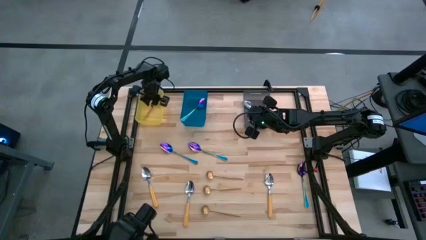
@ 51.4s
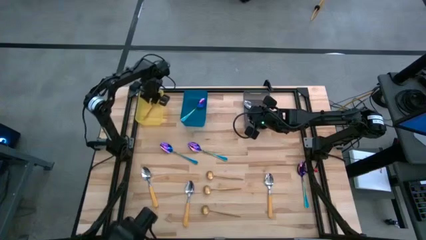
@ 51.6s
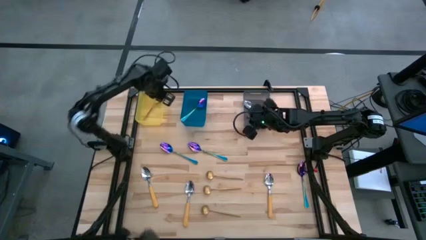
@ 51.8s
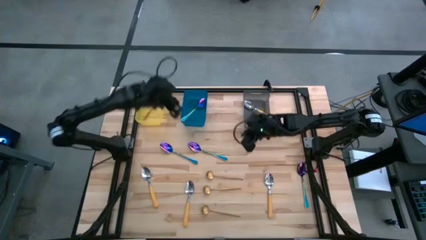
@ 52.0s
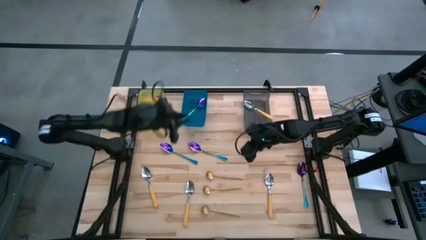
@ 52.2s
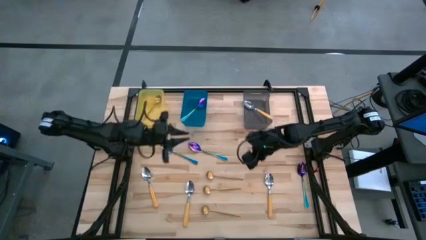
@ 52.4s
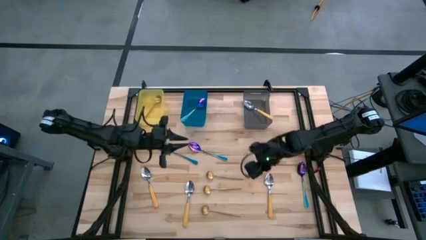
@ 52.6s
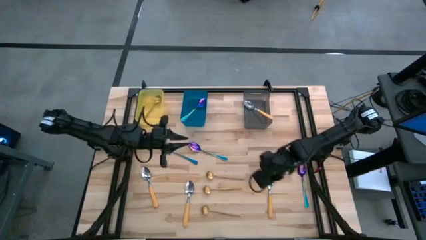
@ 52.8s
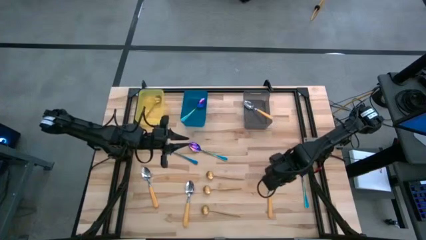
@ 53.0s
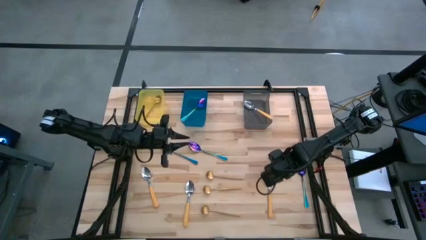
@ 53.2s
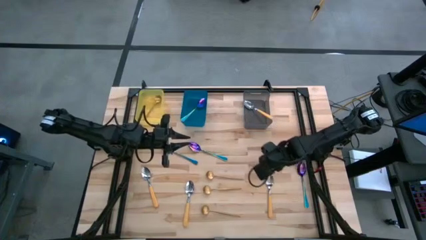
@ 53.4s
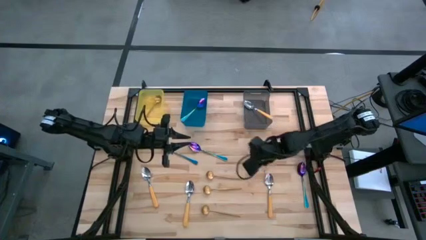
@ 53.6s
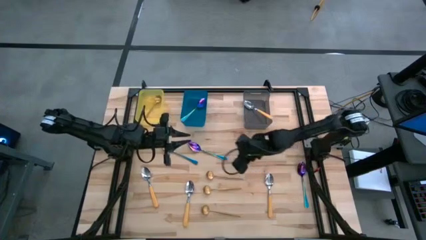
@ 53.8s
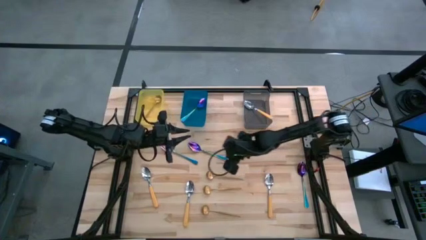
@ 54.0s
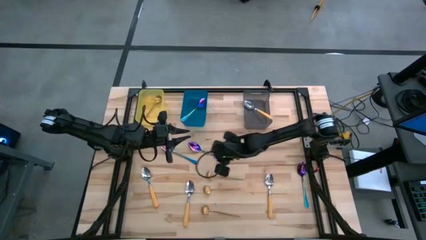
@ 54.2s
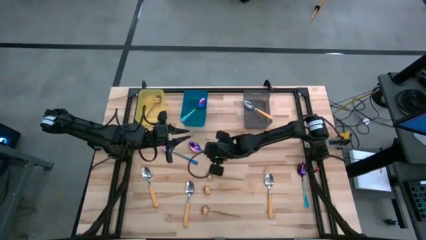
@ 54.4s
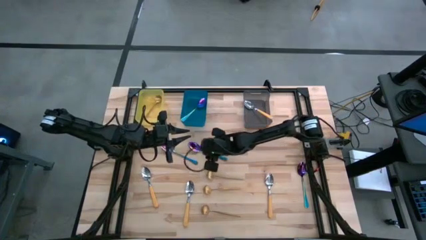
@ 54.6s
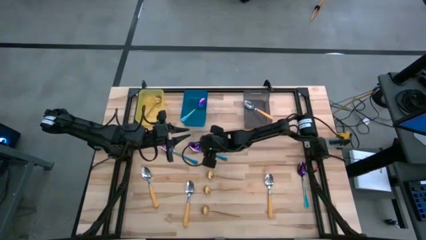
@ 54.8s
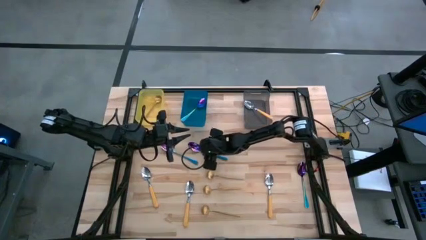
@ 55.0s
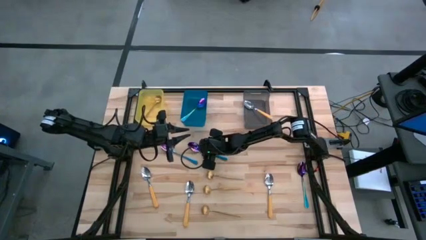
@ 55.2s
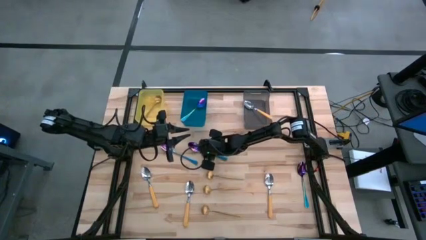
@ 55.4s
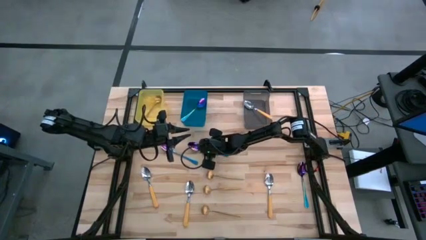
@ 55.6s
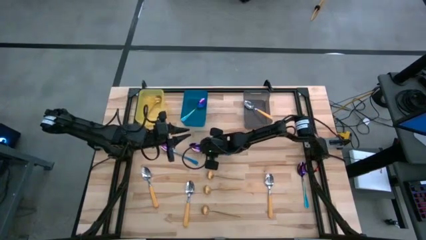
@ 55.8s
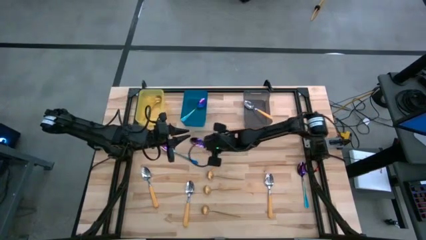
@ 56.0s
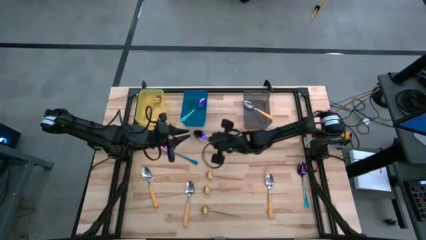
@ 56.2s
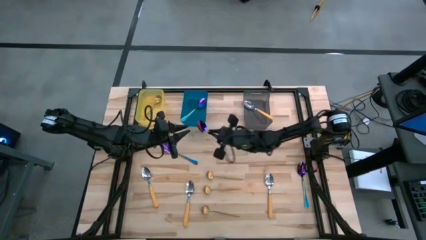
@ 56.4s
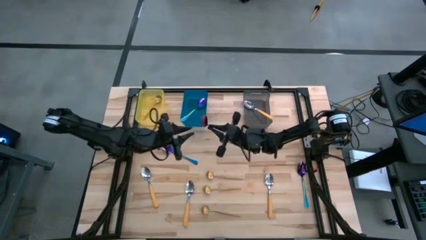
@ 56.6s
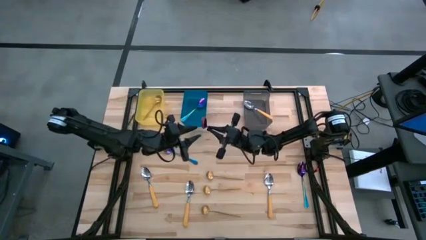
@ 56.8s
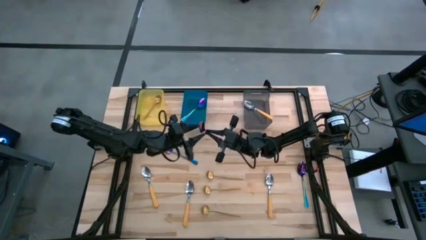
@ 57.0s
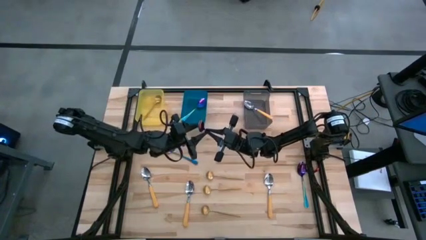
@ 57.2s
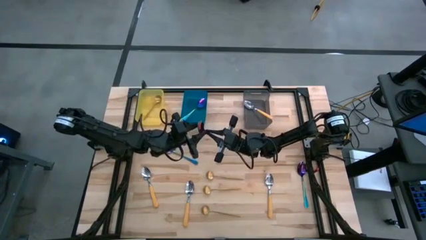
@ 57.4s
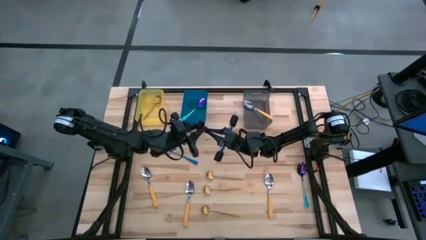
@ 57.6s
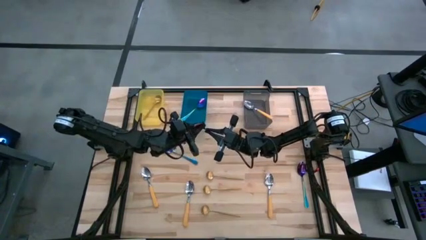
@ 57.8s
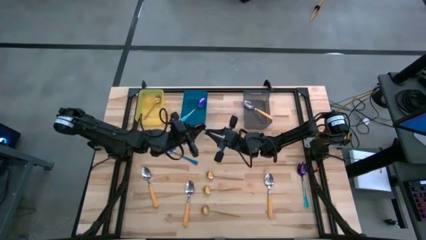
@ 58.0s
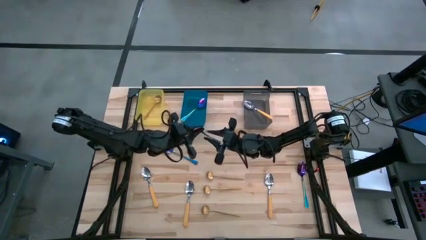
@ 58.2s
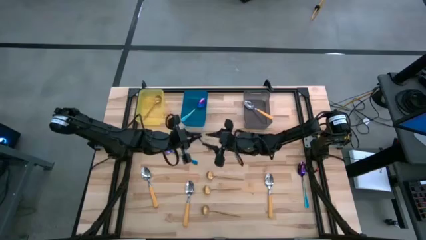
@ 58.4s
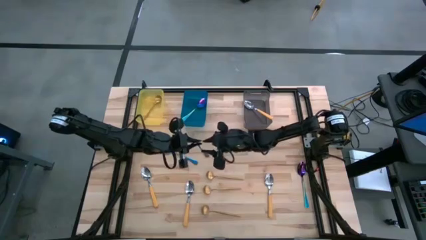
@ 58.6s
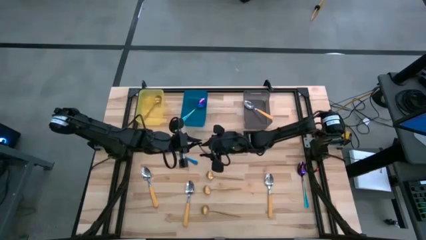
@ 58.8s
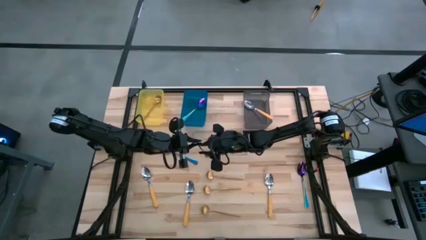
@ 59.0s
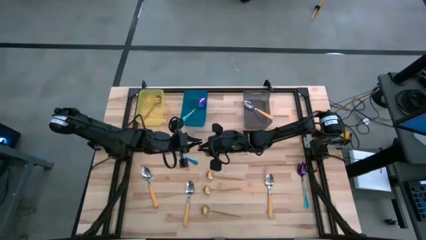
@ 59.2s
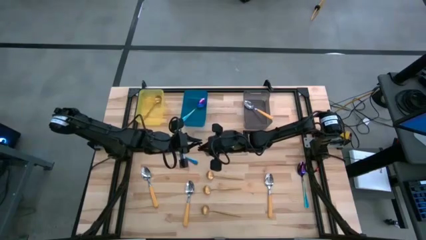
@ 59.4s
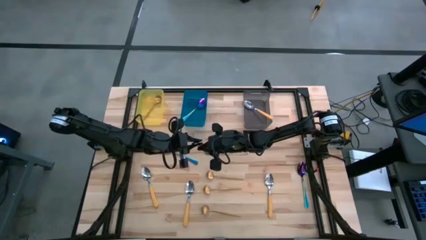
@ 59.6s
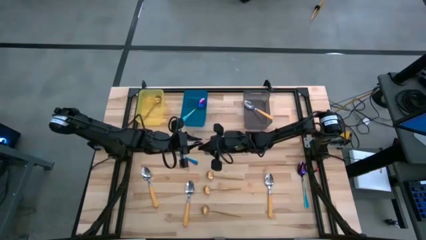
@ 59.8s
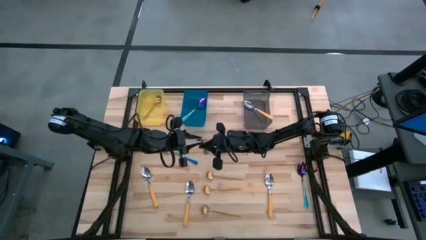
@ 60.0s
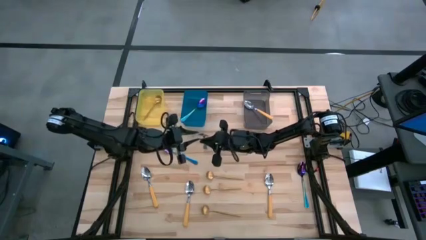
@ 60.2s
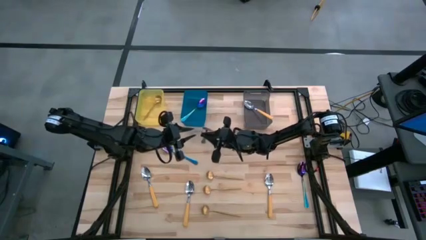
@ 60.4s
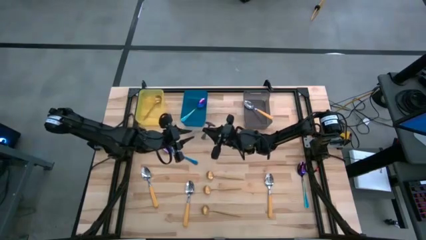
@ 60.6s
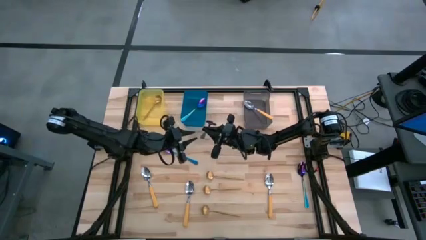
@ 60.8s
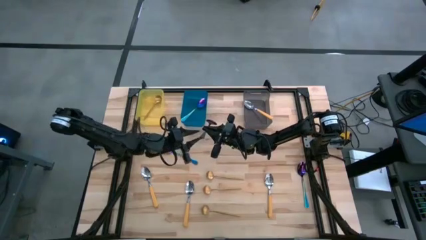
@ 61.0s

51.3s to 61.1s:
Task: Sort silverware by color (type)
Put the blue spoon into the blue bin

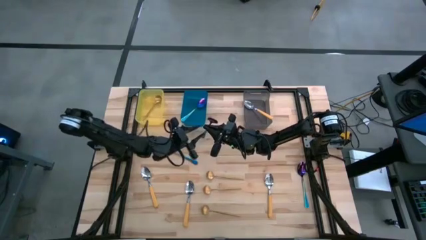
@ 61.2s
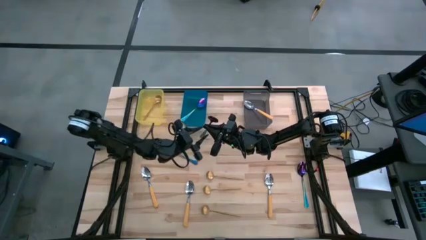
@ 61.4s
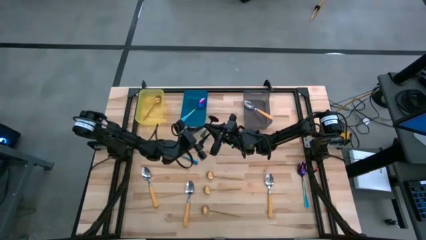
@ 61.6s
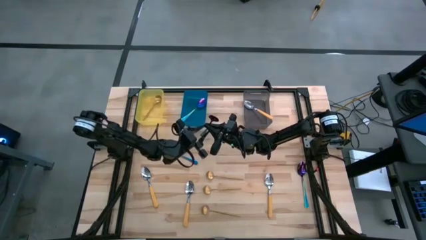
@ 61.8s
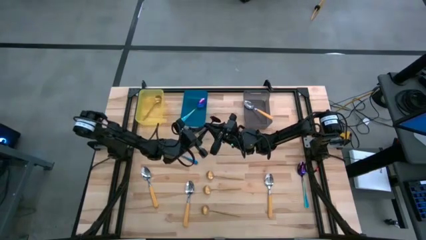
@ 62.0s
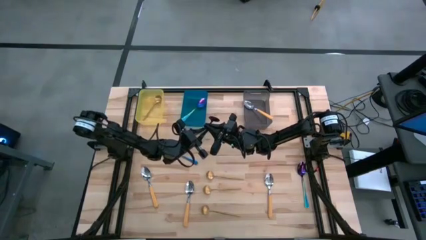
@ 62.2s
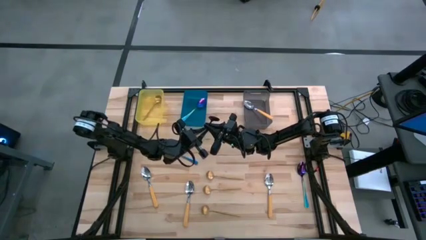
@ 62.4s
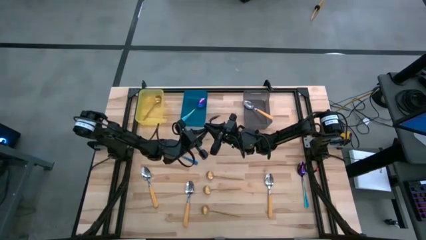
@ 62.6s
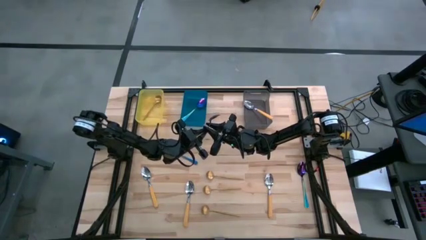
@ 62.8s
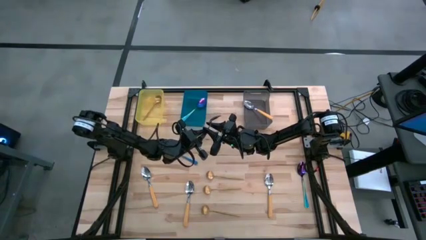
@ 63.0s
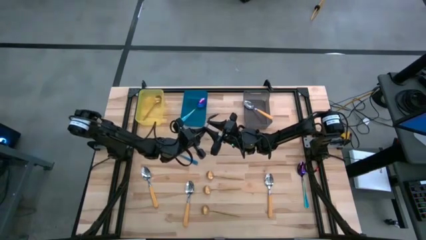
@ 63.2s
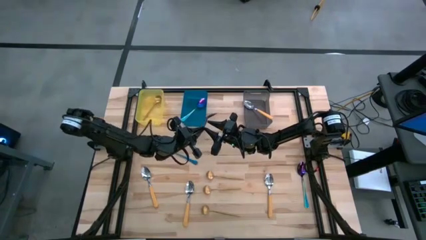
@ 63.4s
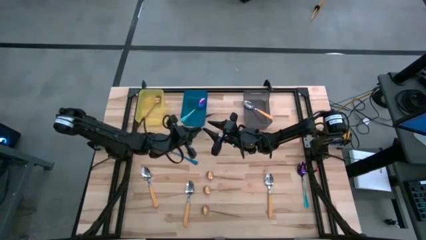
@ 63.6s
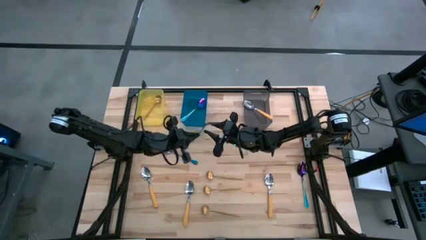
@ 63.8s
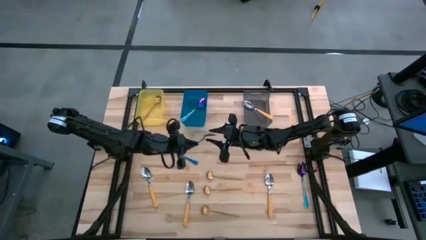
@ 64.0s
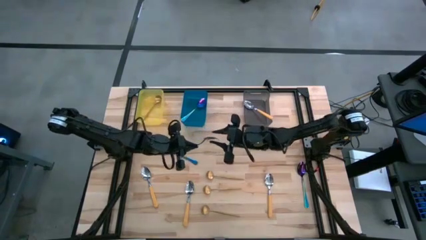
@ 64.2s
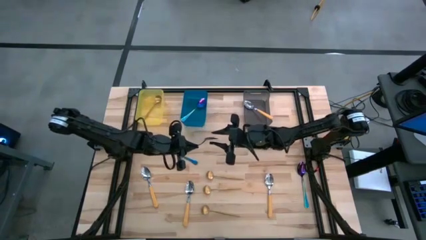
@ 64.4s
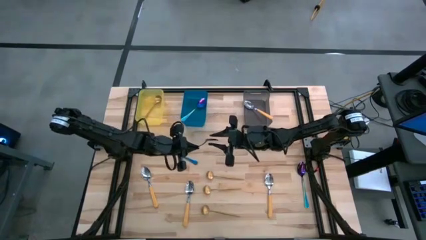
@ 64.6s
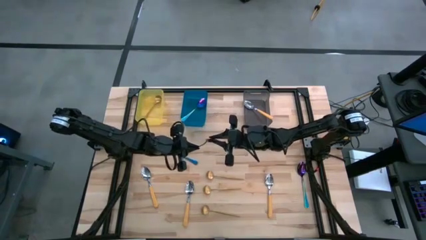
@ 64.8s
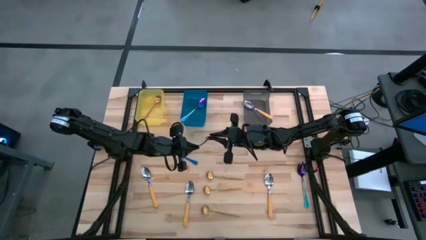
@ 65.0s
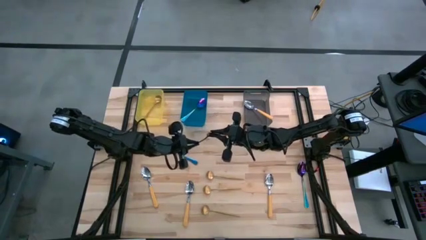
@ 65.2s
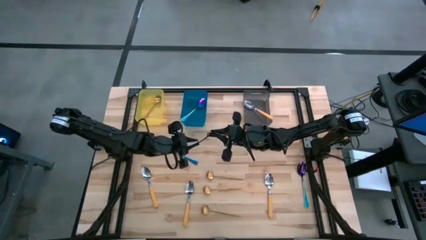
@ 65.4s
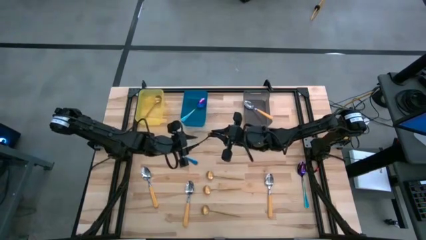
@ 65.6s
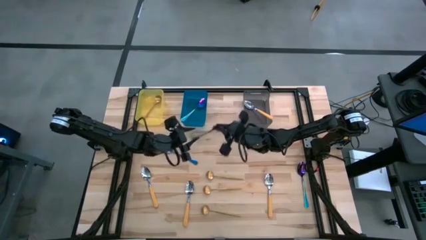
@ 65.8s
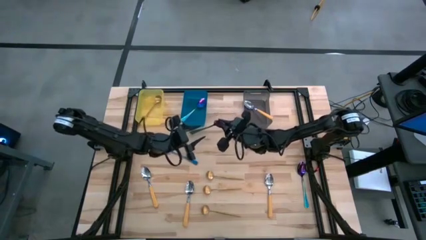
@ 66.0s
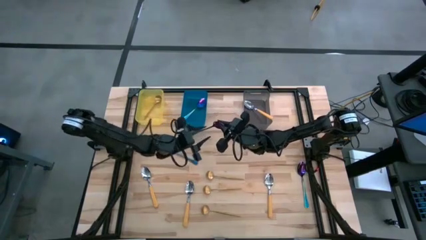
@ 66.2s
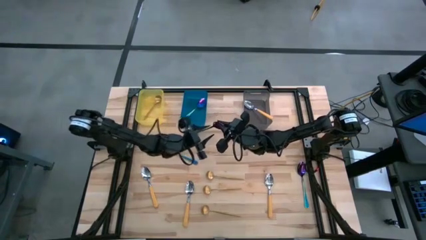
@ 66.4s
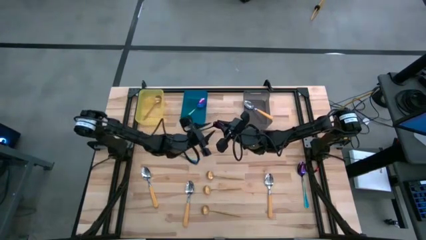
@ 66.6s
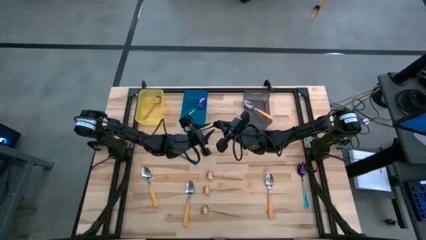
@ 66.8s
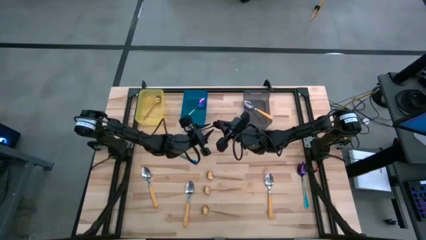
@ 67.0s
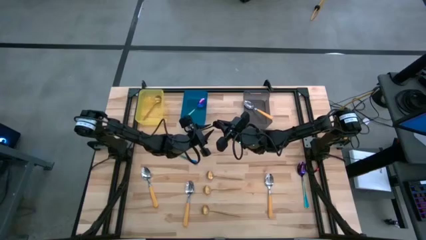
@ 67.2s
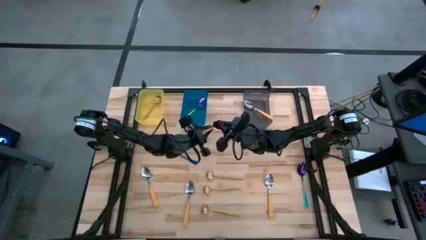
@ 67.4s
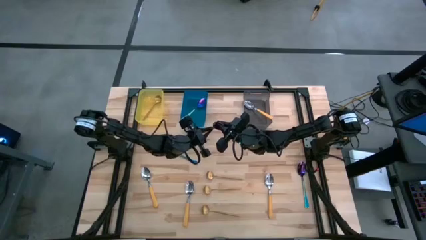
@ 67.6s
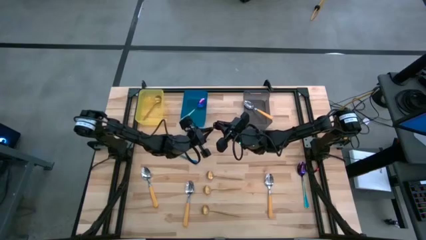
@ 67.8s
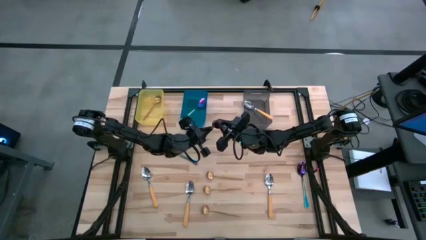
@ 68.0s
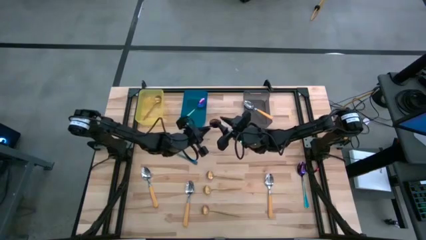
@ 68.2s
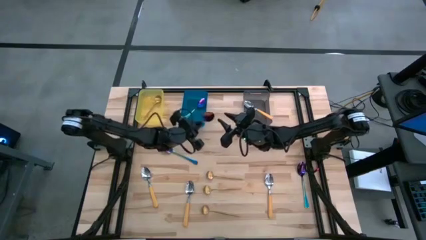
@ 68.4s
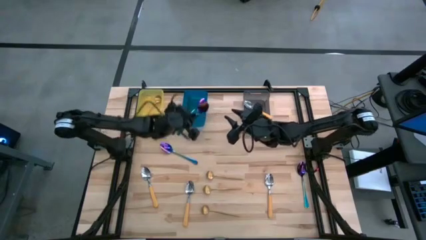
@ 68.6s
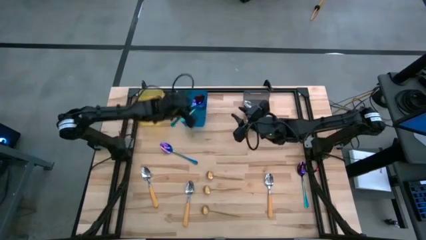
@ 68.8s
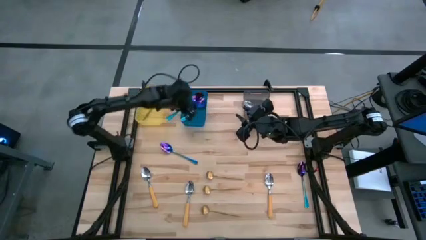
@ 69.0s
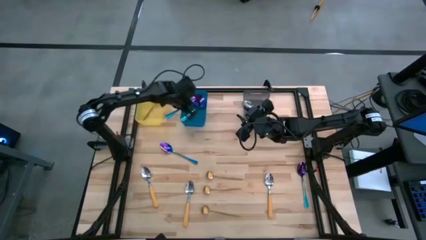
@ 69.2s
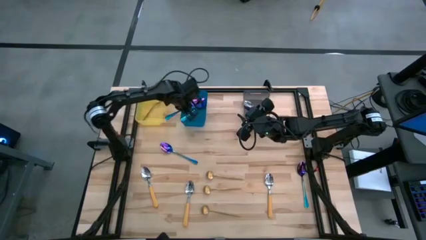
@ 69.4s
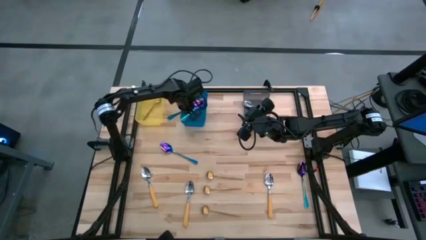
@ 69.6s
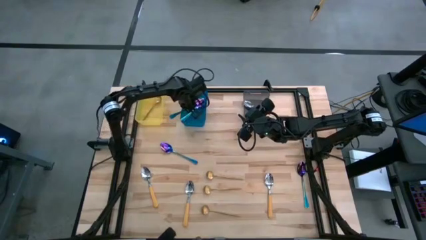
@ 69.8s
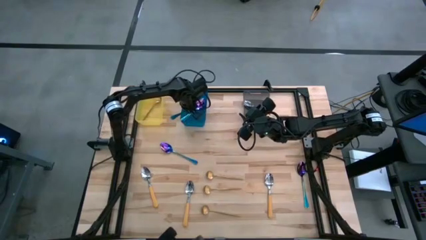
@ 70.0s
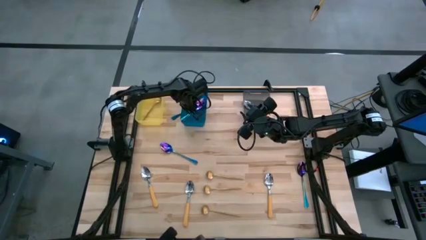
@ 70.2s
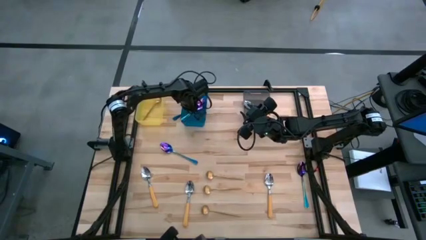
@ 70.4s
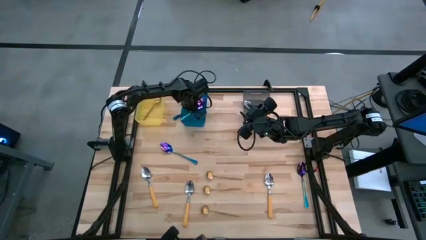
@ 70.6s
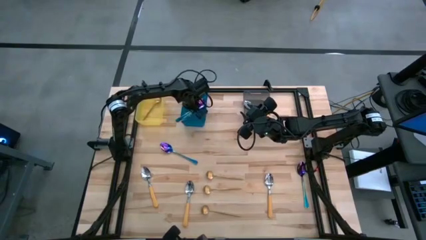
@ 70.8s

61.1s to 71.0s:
Put the blue spoon into the blue bin
